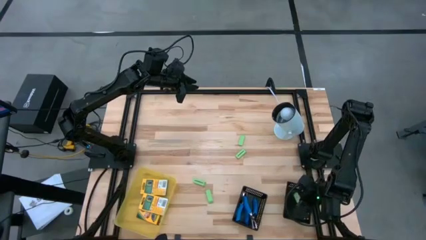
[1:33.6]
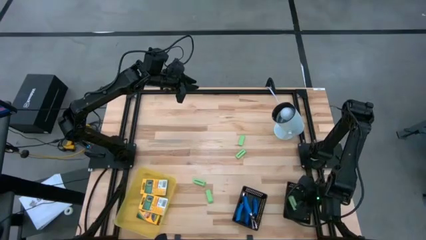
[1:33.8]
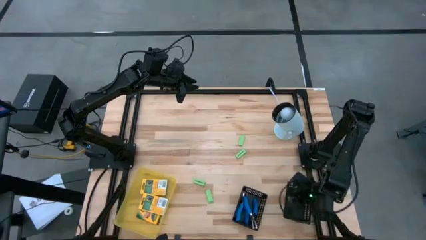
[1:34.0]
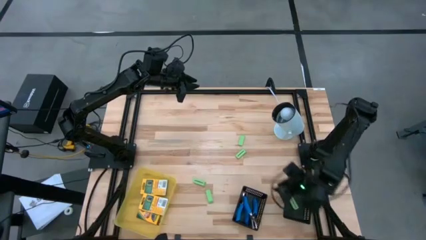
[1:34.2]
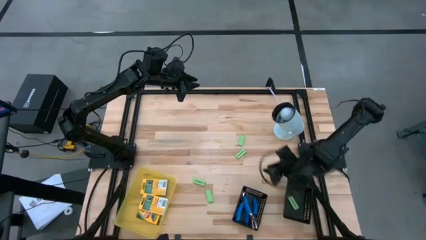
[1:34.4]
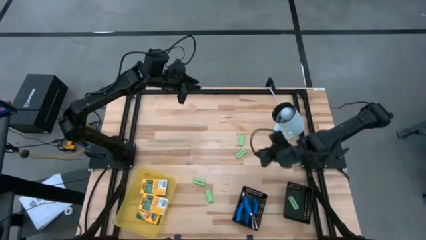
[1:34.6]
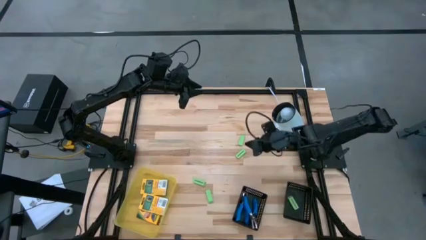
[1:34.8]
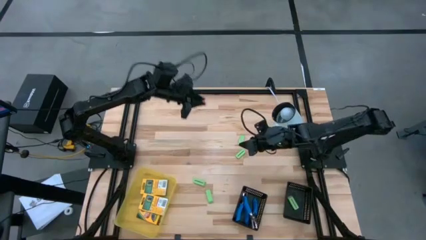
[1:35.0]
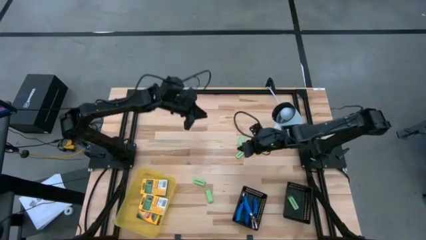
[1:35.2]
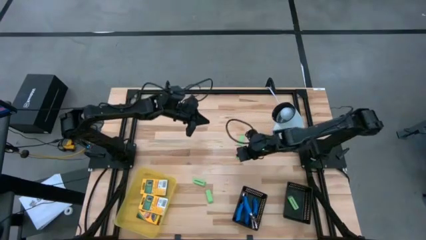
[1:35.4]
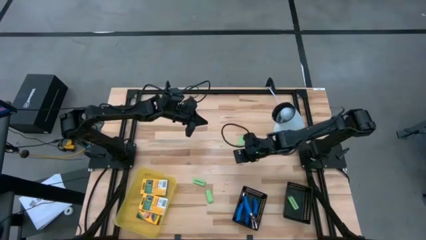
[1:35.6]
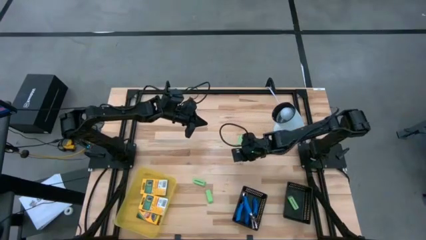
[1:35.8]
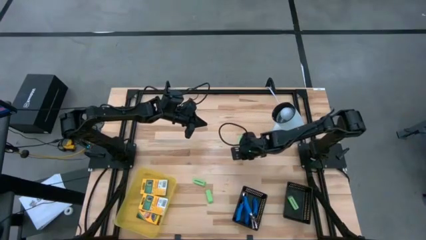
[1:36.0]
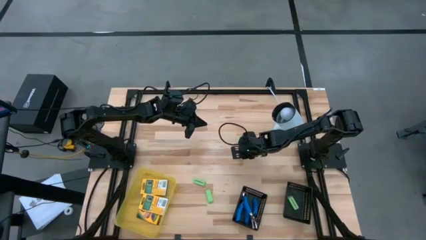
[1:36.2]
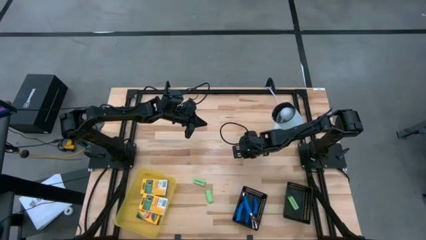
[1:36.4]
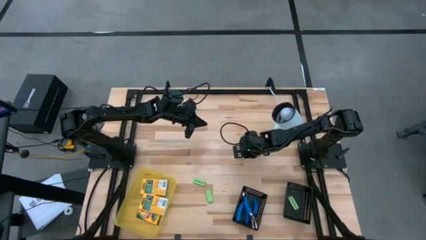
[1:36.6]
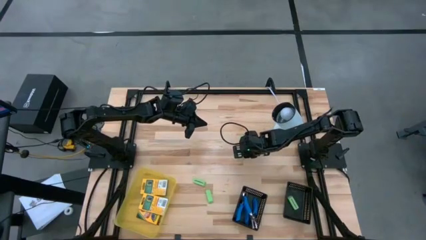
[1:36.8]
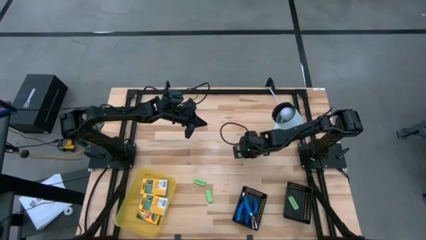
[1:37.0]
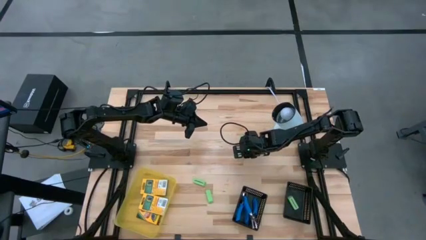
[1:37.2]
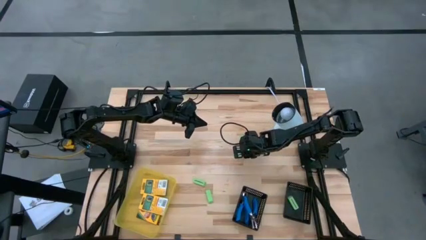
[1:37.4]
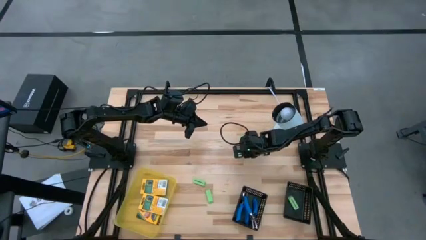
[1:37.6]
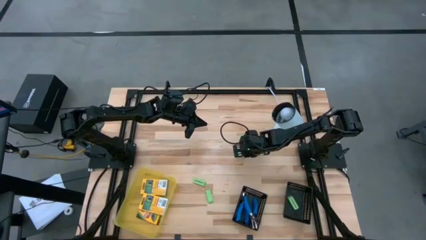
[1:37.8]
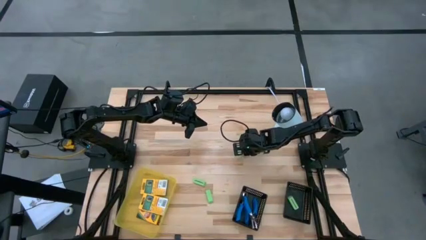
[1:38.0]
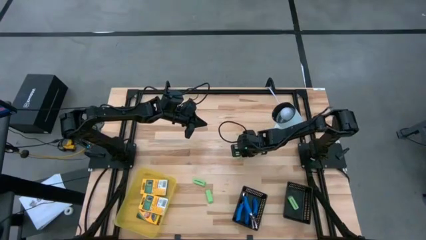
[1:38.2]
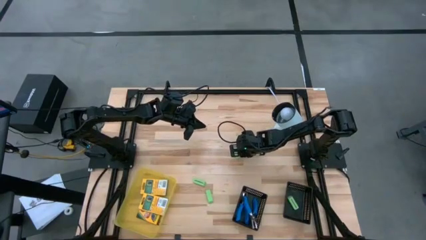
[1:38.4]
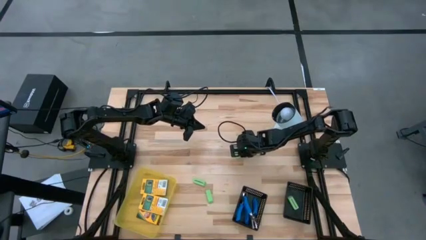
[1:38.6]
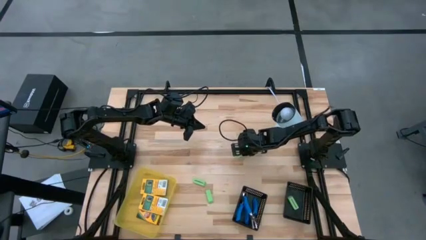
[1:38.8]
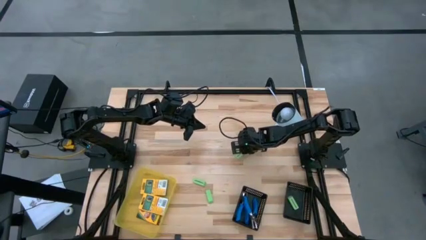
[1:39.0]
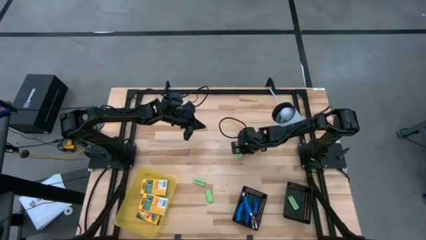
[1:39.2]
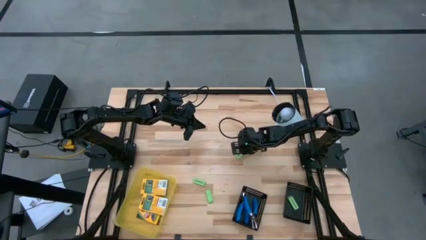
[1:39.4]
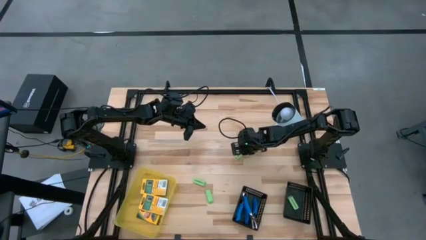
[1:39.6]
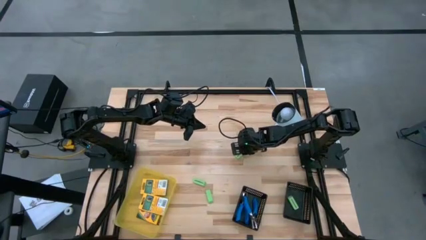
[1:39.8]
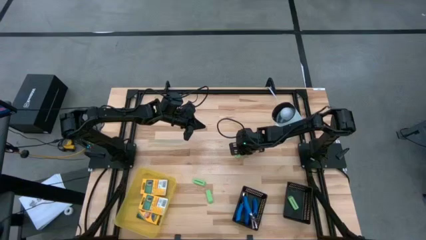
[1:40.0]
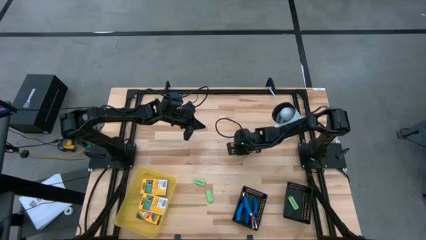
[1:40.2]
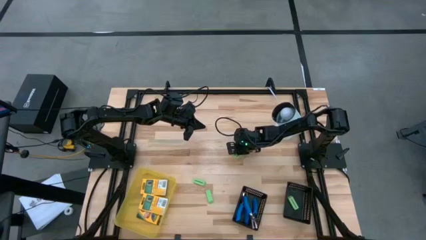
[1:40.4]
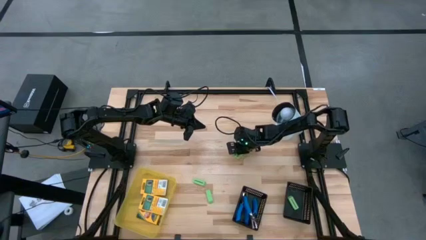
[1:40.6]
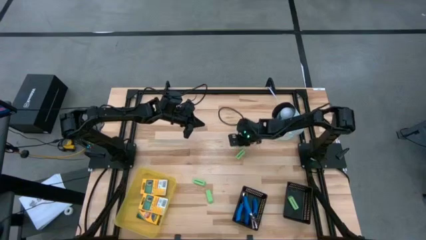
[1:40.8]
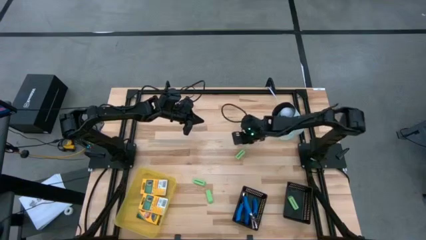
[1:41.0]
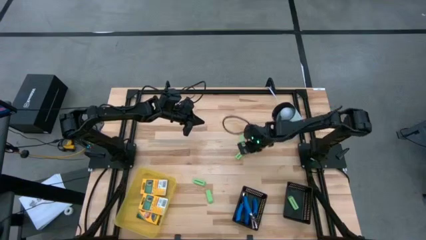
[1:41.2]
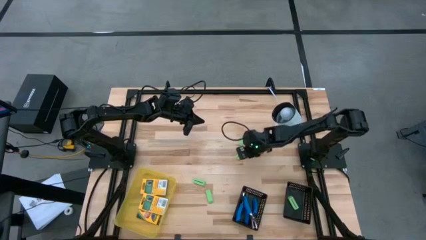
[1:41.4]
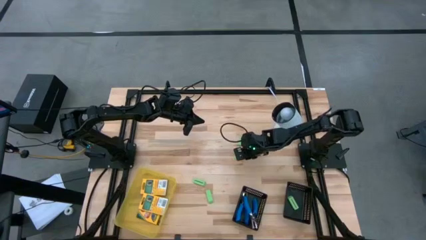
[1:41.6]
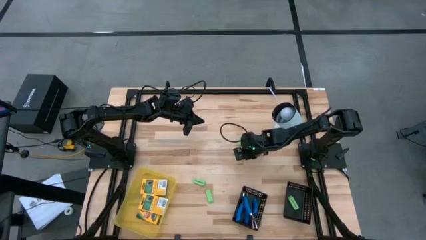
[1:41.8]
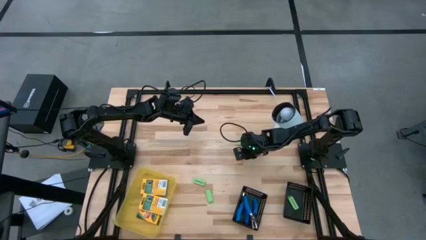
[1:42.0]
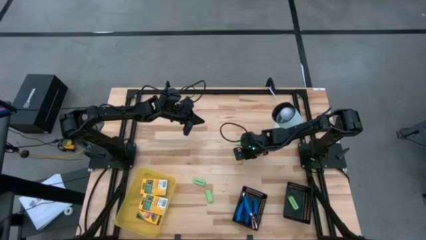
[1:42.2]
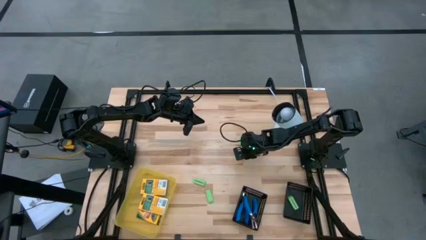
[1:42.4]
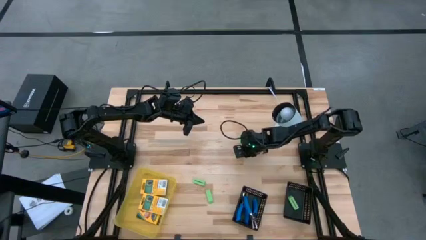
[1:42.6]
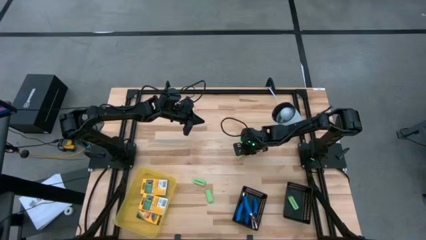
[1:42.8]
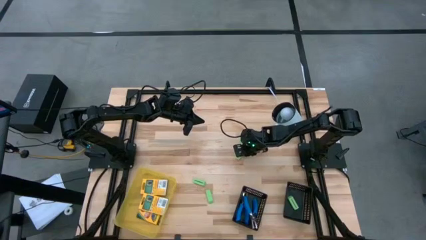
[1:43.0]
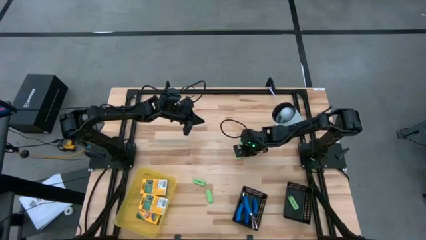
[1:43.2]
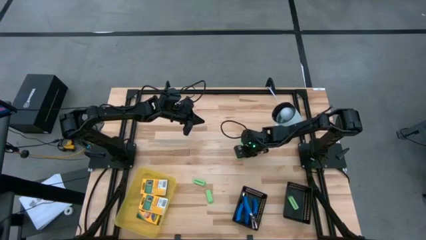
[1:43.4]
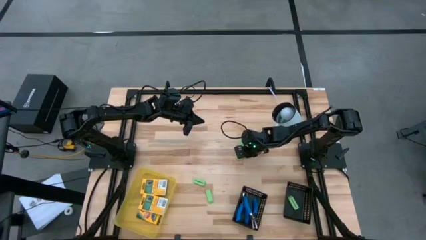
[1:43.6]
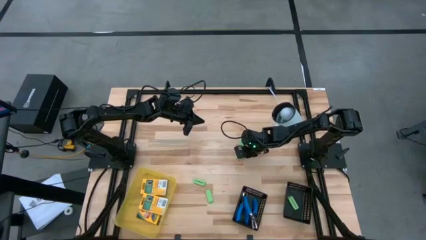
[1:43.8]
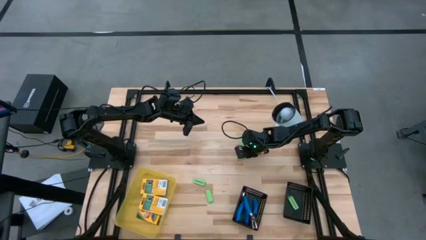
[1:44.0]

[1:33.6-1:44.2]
Task: Pick & Place School Supplies
Put the green eraser into the right black bin

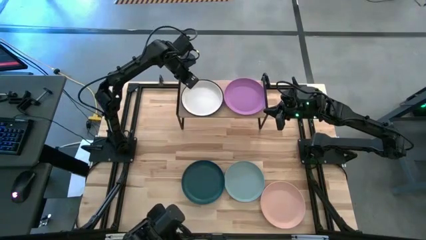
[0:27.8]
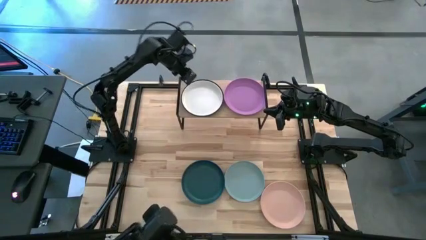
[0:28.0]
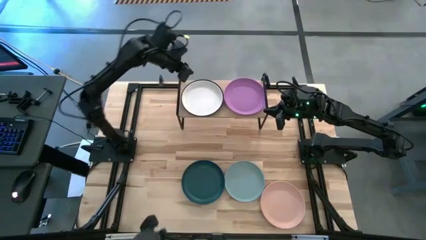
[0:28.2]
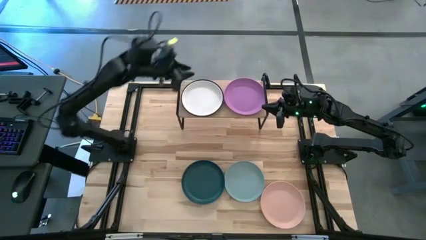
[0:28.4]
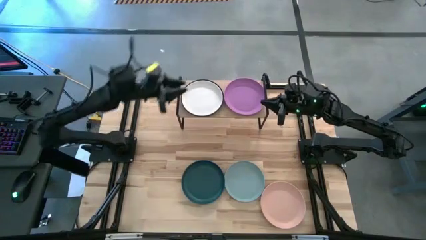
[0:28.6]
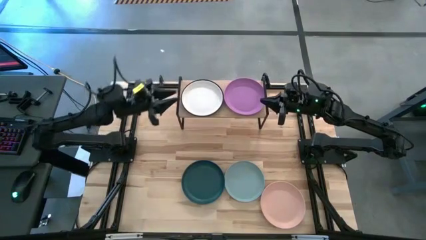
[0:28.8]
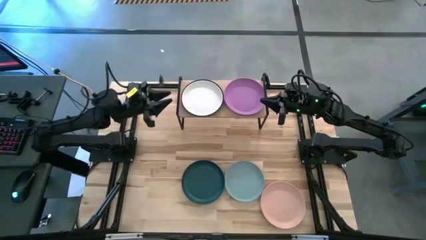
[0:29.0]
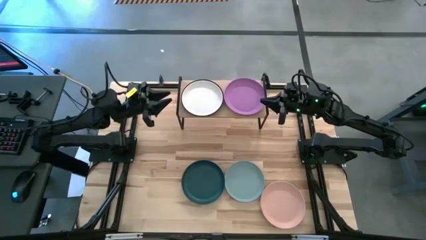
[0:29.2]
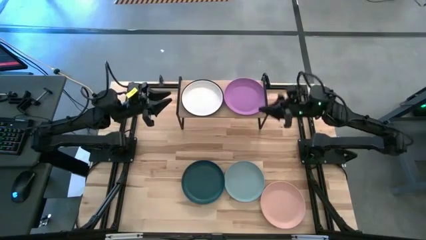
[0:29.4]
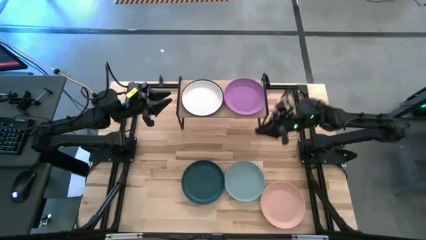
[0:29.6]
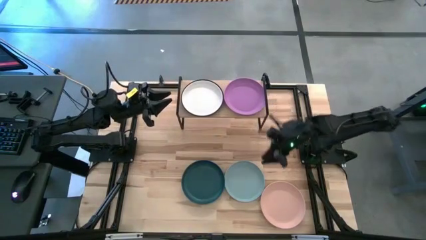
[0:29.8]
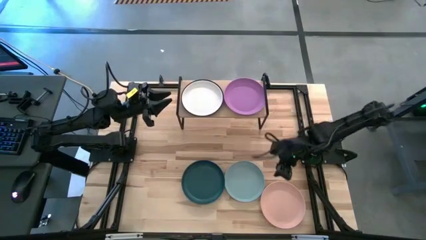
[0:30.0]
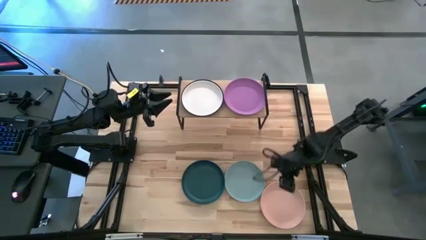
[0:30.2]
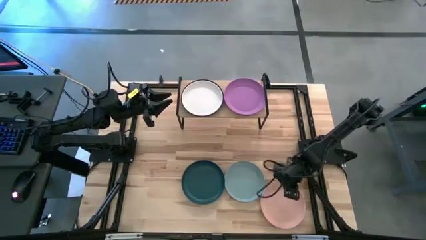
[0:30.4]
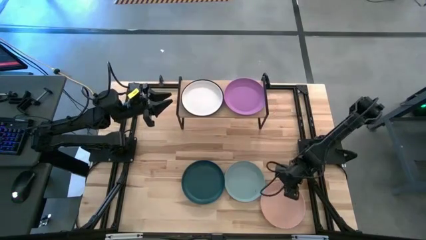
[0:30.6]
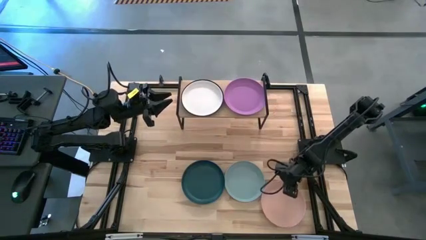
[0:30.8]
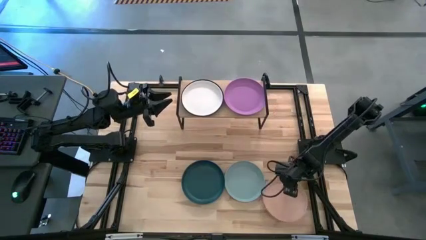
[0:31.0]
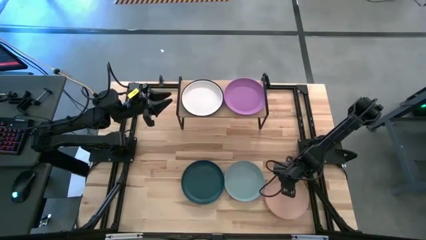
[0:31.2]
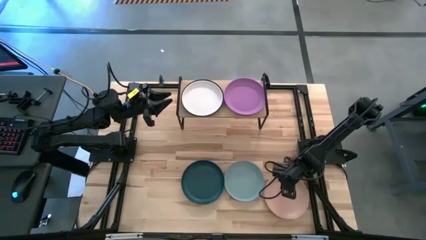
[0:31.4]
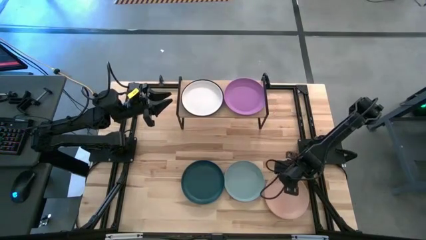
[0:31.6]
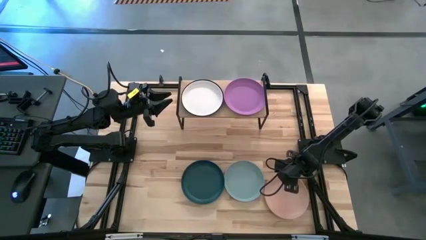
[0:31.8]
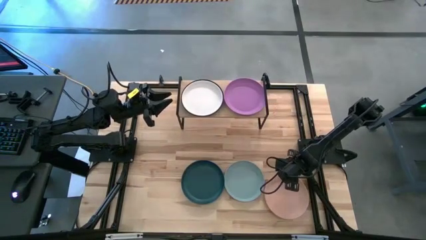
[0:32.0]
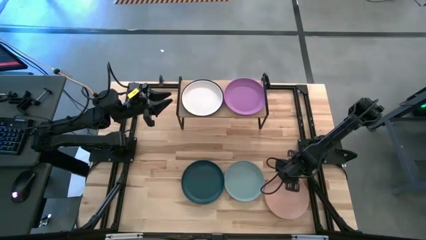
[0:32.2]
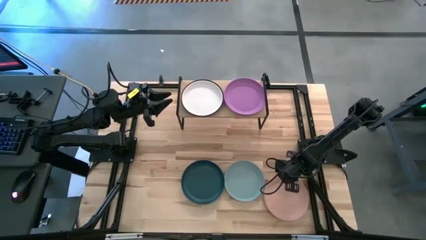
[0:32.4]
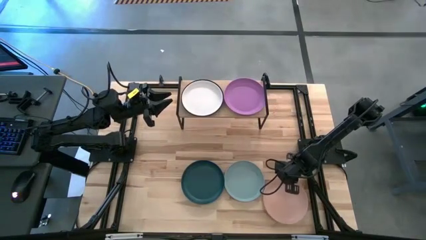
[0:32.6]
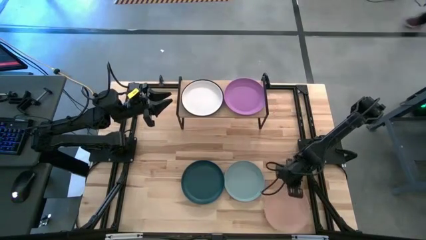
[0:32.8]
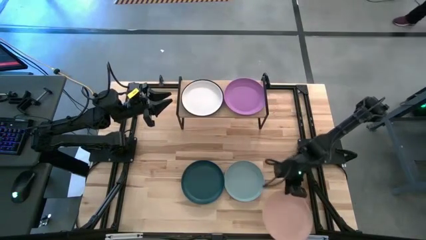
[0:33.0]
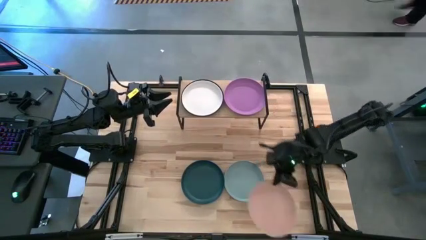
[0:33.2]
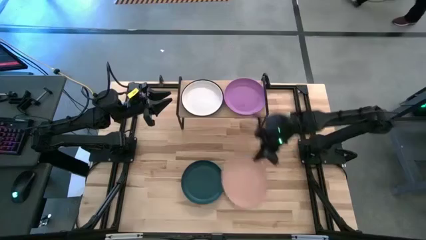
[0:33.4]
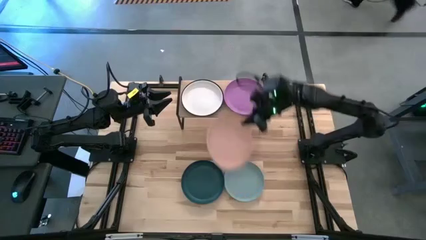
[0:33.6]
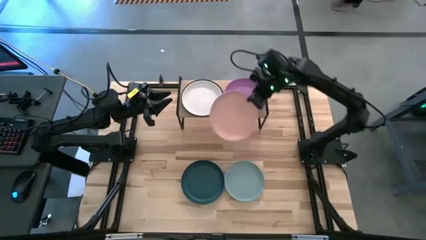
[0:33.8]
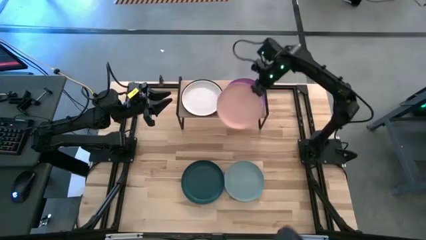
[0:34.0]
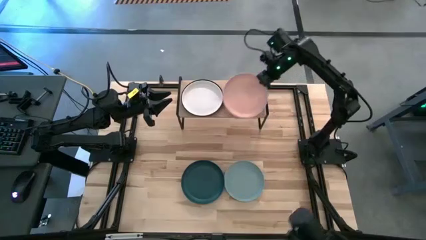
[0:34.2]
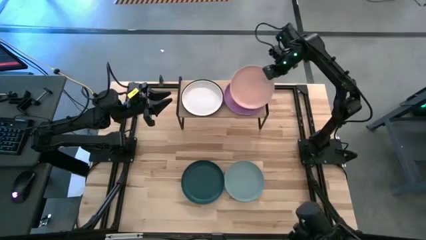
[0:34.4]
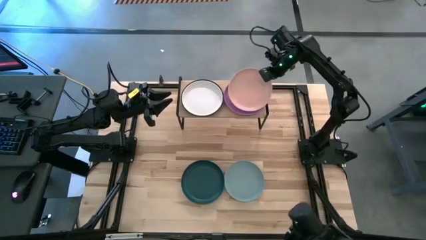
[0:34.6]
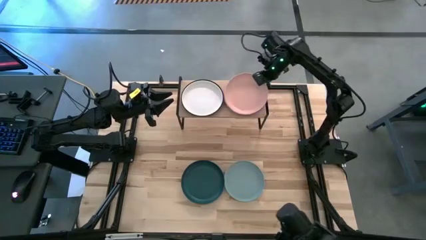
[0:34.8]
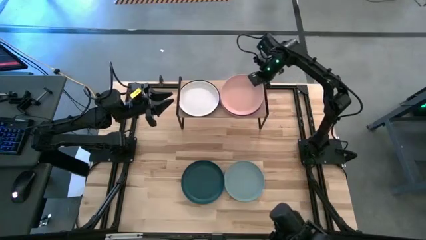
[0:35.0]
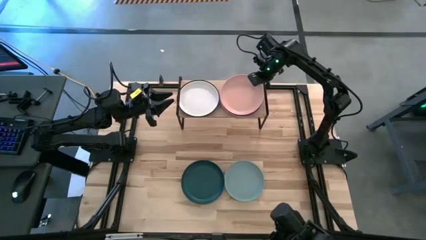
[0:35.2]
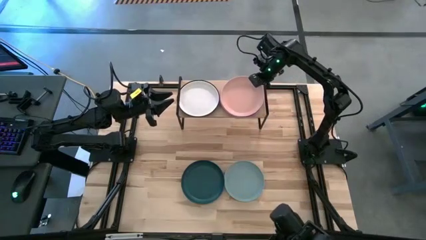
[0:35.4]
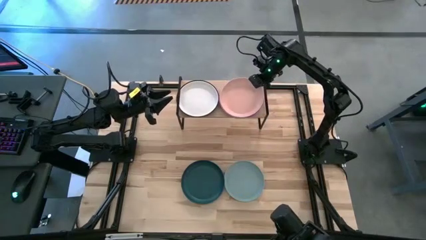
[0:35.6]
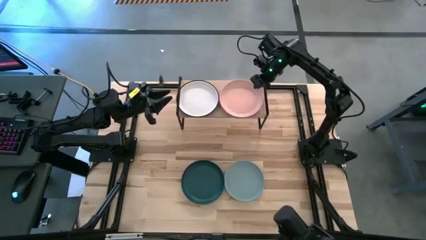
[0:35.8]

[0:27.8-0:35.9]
Task: Place and stack plates onto a shelf
Stack the light orange on top of the purple plate on the shelf
